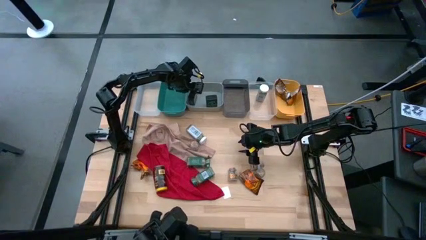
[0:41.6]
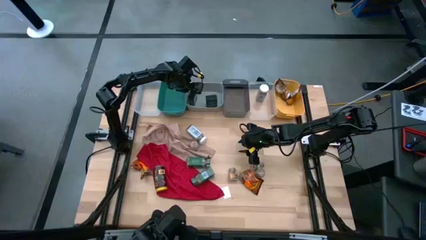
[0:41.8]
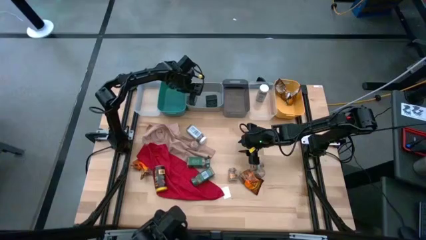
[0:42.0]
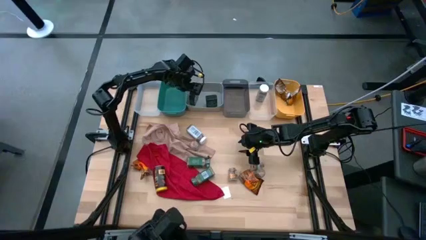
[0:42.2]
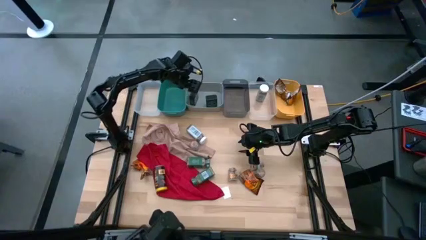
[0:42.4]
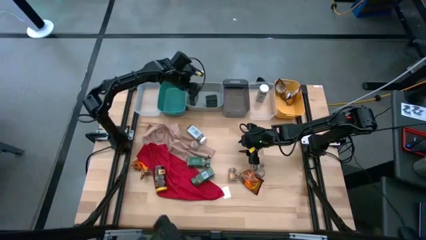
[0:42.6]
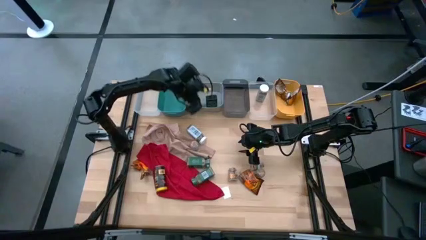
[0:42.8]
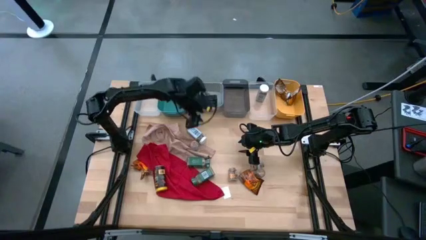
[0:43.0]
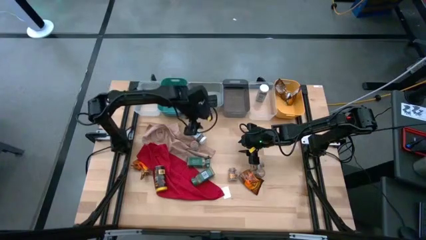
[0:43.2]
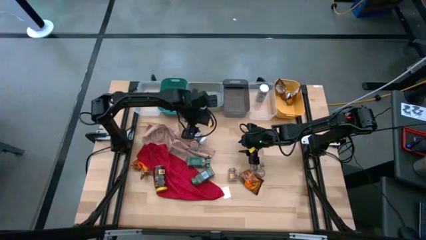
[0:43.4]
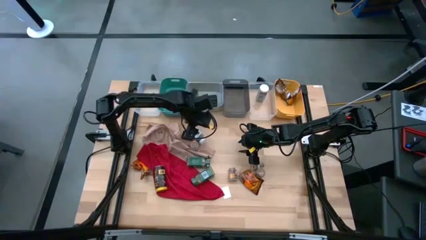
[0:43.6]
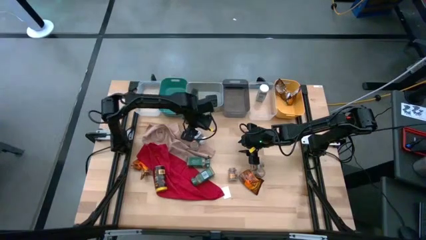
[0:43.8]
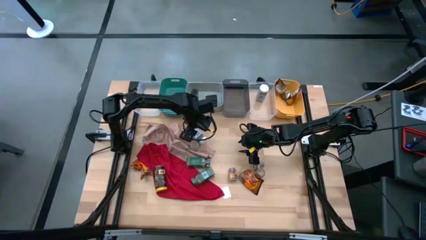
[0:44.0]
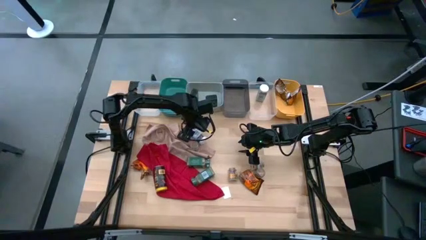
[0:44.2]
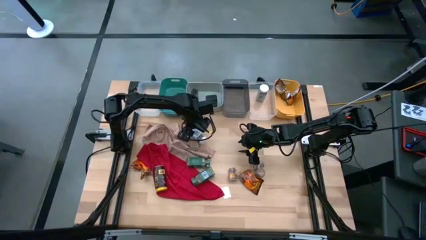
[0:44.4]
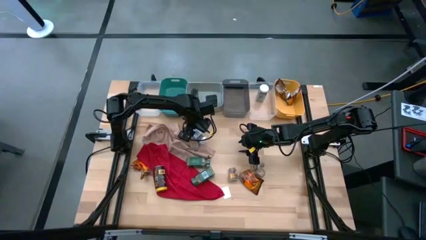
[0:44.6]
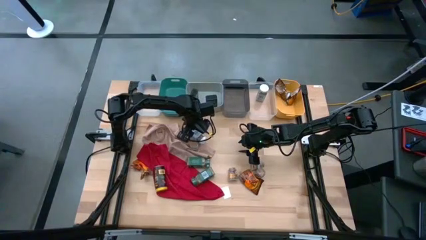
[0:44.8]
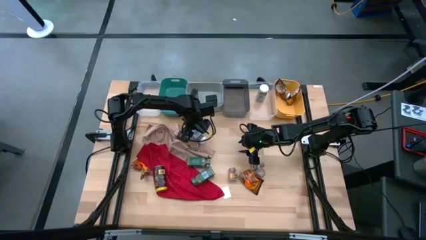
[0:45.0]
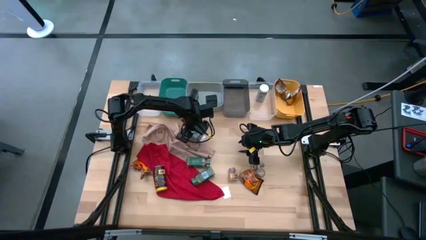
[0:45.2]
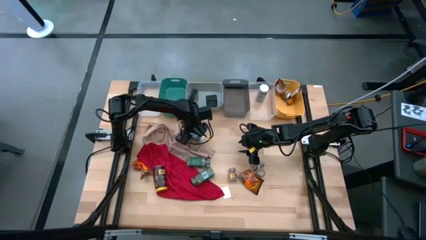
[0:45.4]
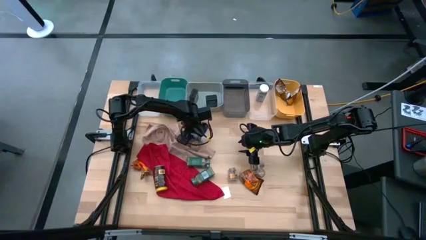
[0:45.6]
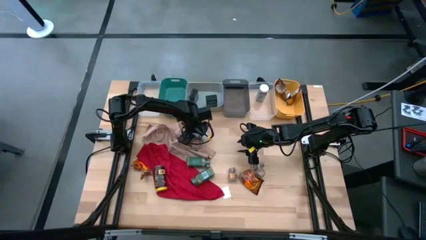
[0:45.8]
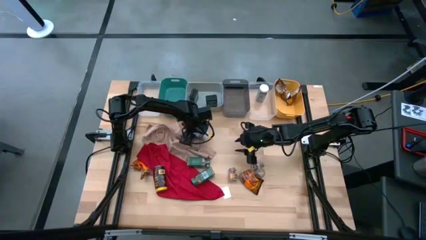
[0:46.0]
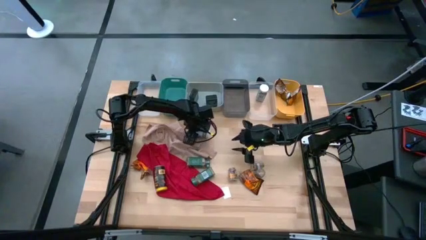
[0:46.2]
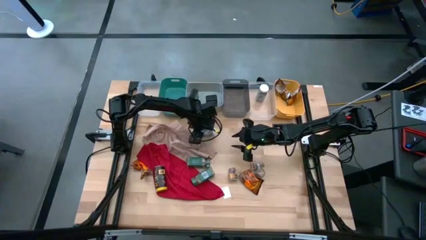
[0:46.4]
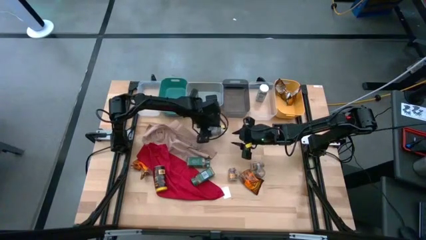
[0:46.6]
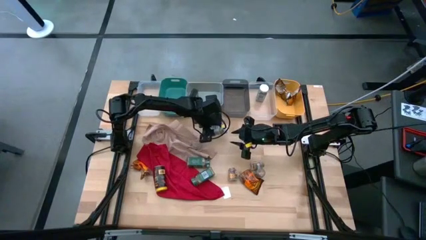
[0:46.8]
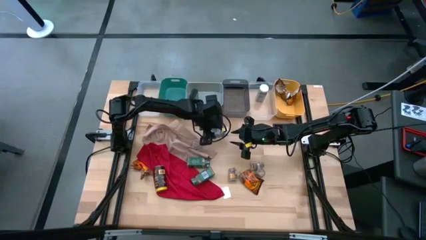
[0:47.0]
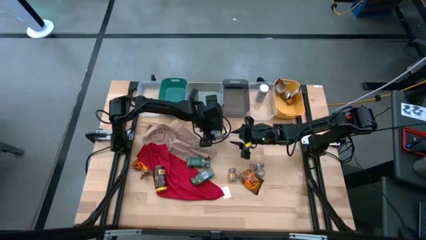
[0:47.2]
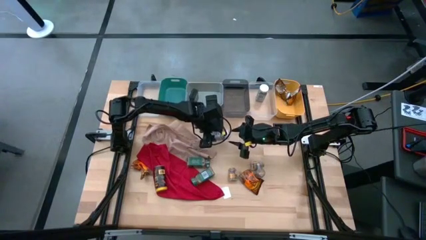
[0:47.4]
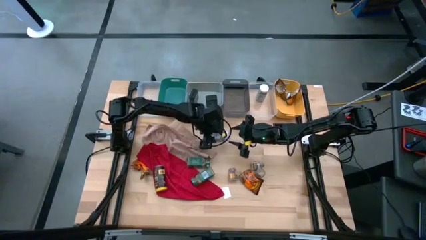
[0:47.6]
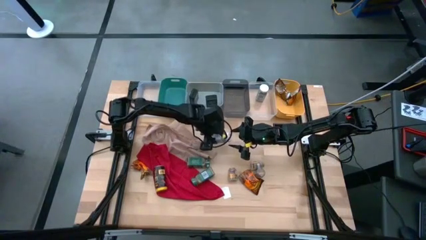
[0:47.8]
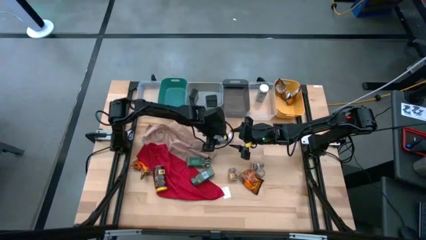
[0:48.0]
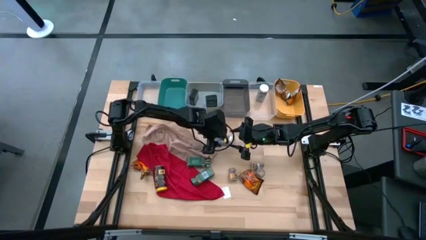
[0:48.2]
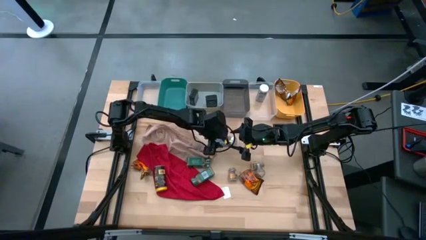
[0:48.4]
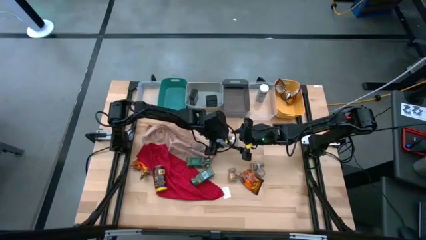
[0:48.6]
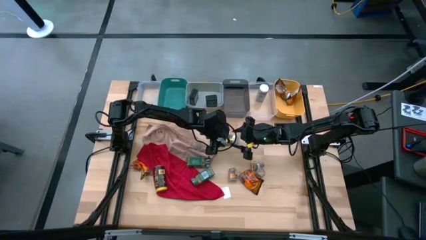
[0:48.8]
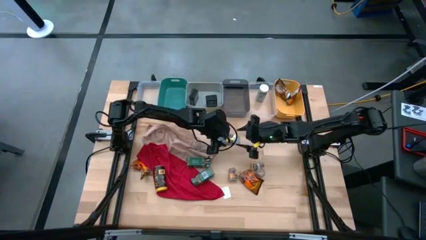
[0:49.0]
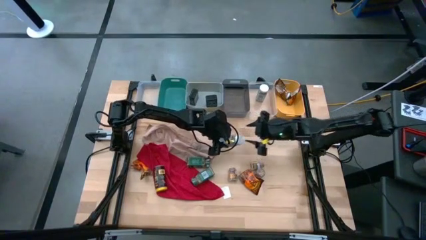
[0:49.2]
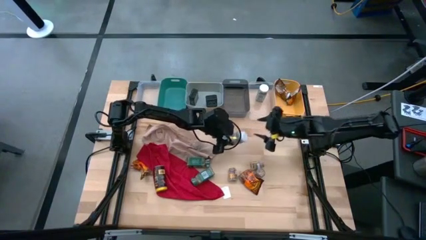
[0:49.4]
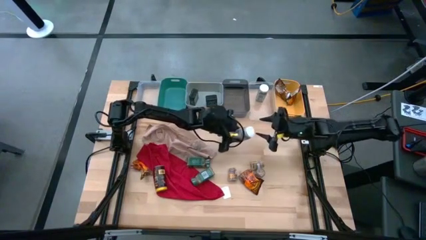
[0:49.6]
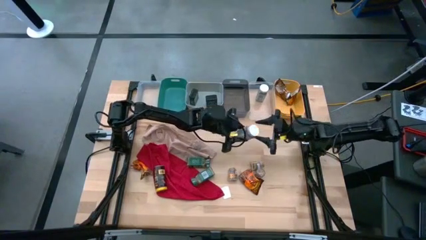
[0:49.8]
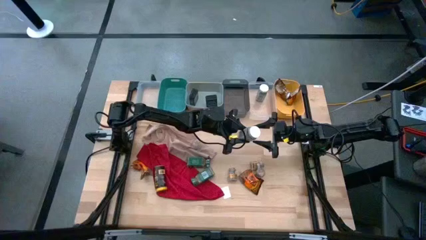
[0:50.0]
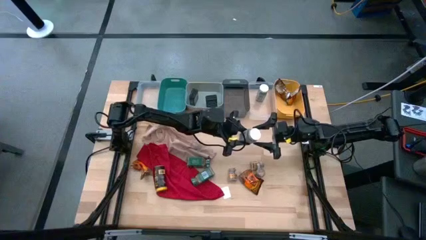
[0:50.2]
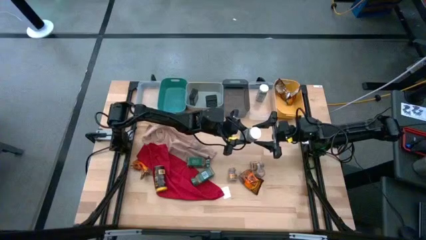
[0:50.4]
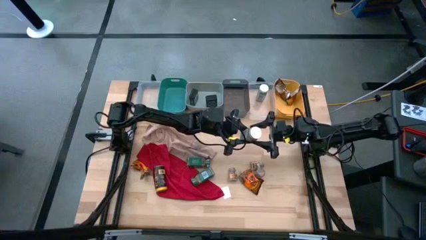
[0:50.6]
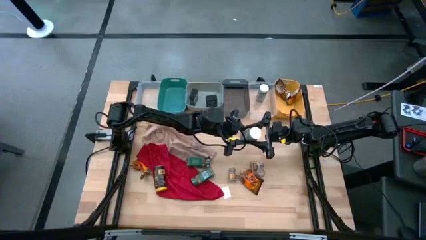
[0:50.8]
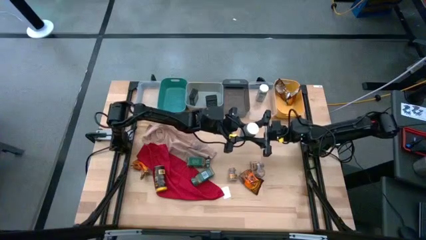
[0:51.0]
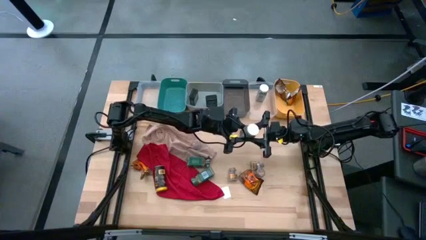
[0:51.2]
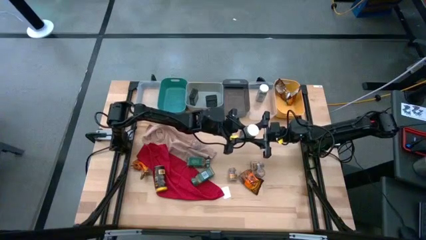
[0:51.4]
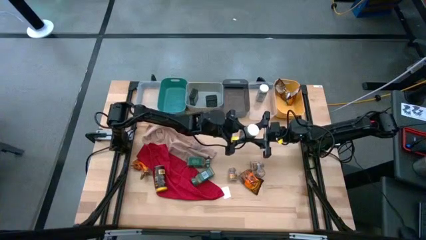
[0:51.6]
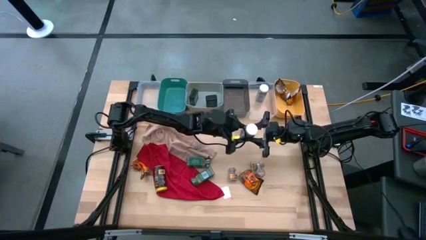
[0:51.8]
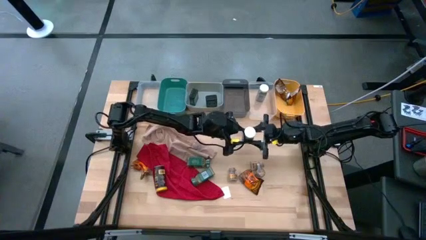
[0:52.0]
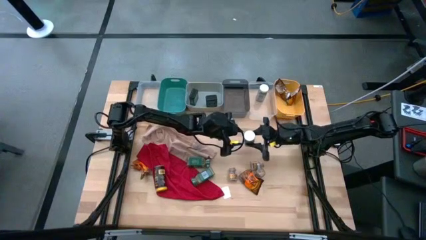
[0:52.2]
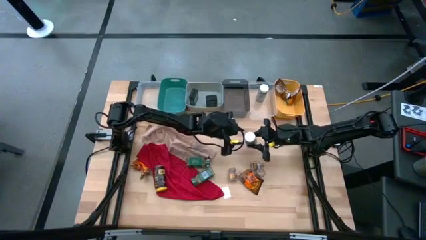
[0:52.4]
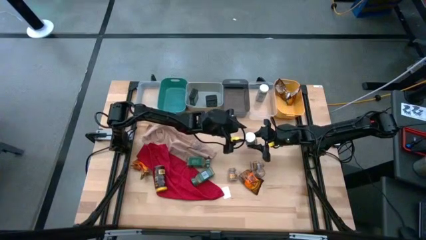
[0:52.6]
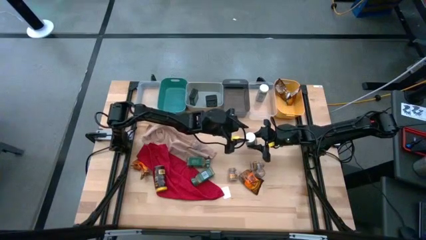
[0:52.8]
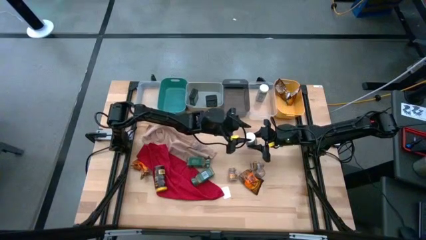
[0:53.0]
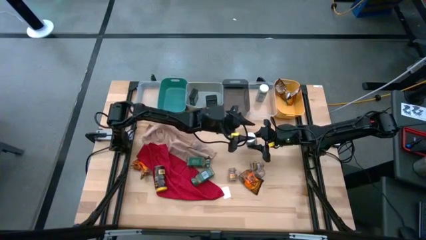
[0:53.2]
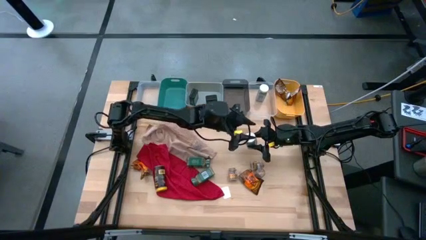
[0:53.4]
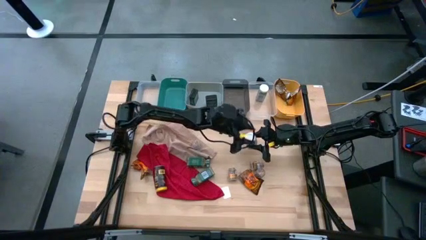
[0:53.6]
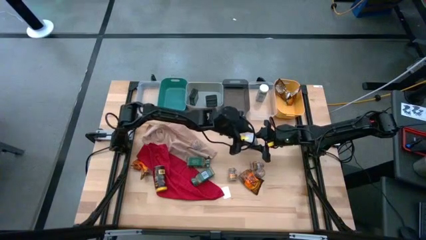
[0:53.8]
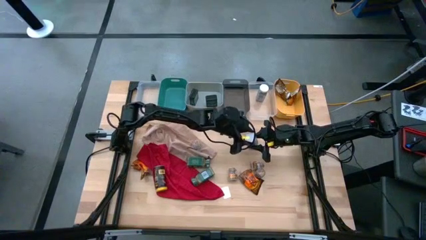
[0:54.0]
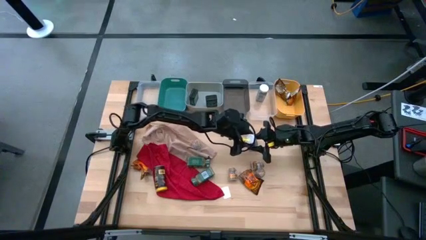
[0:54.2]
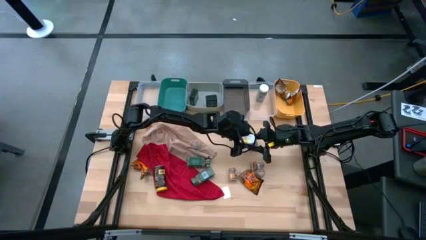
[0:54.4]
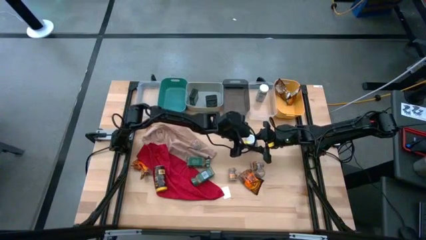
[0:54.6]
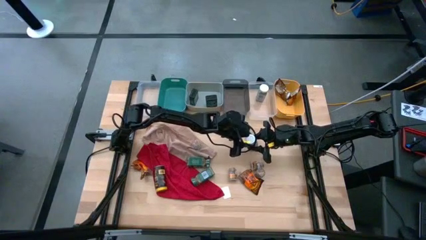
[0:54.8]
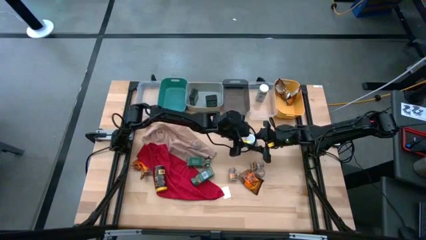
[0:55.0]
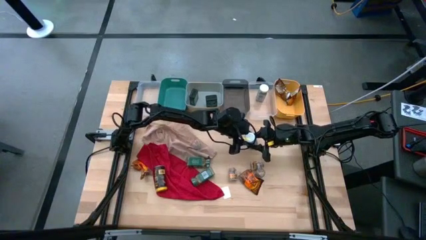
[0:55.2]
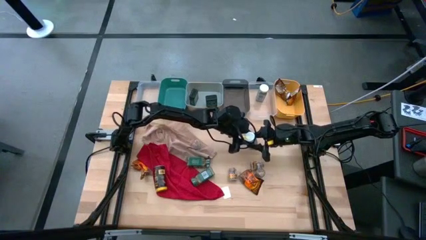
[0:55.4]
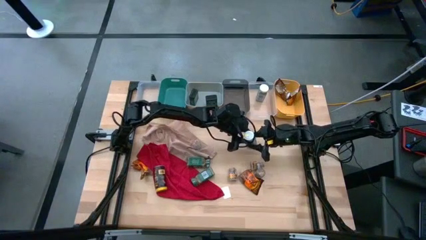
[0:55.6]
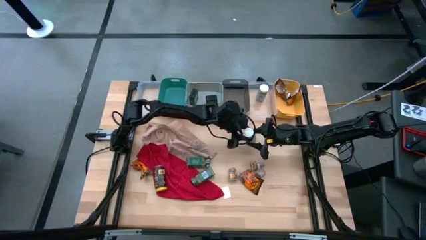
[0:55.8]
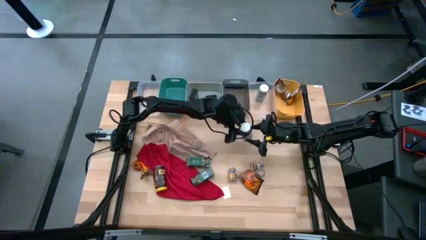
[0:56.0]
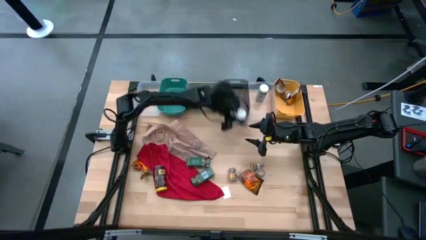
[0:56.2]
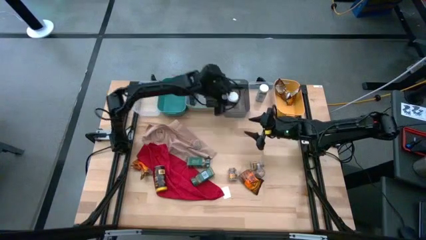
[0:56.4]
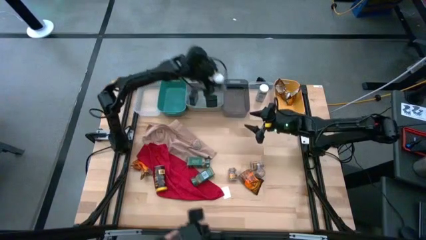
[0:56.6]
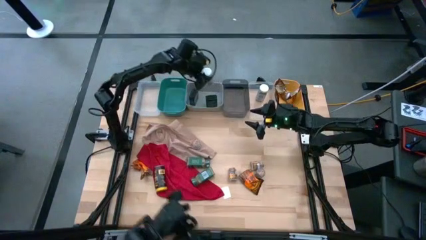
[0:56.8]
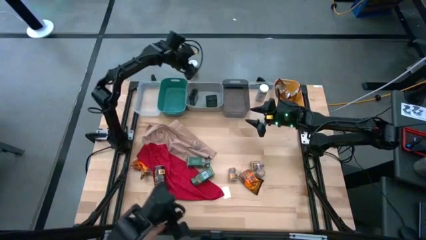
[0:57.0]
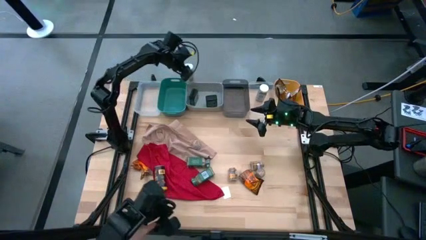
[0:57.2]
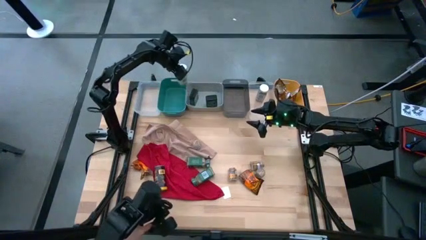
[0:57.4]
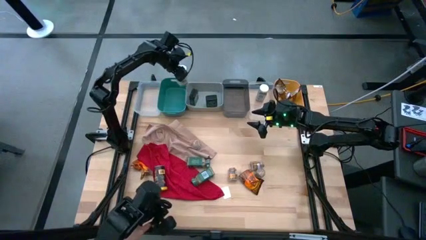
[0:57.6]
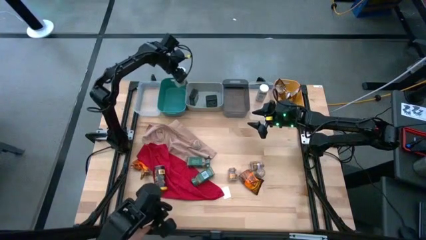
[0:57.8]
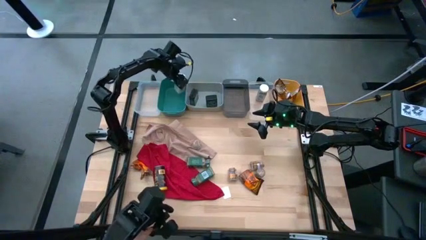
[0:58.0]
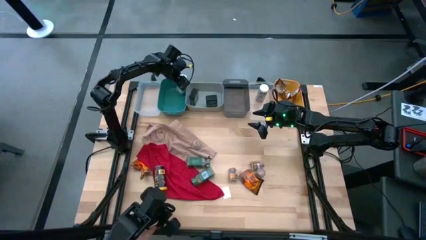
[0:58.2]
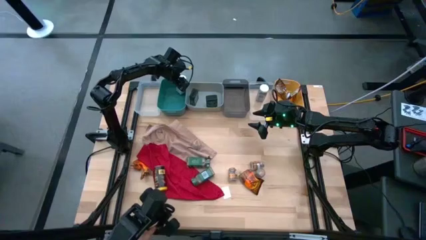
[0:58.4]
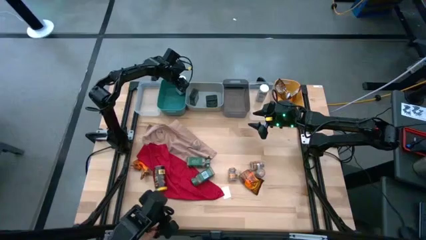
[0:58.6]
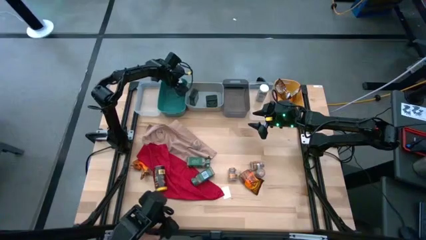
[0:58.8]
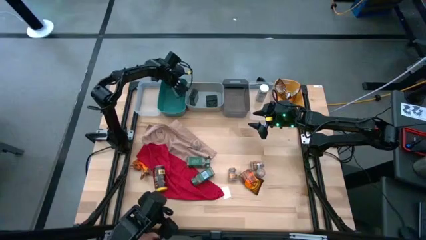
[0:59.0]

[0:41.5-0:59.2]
Task: Sort spices by type
Put the white seasoning bottle into the green bin
